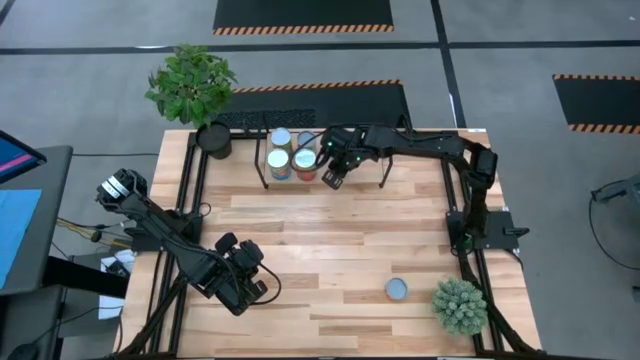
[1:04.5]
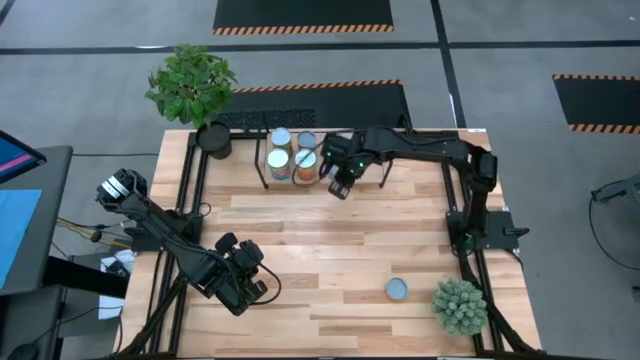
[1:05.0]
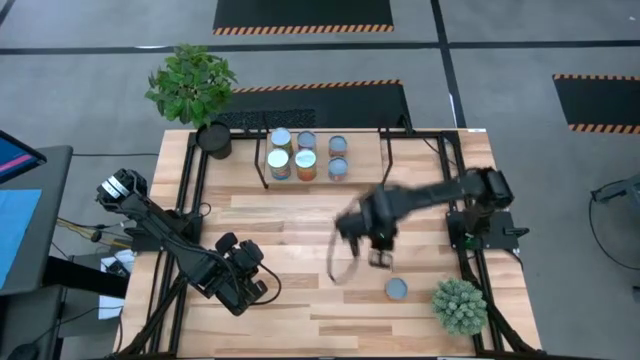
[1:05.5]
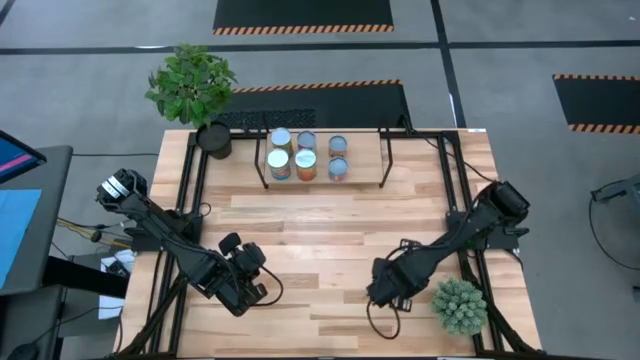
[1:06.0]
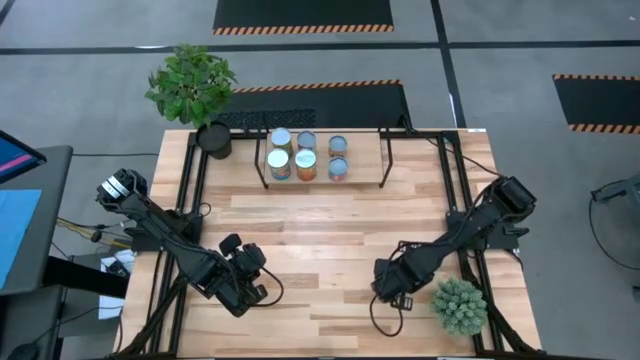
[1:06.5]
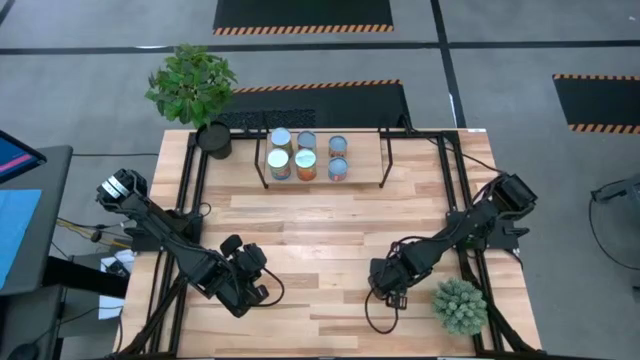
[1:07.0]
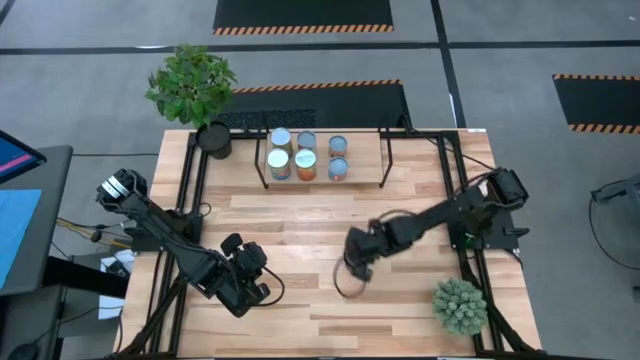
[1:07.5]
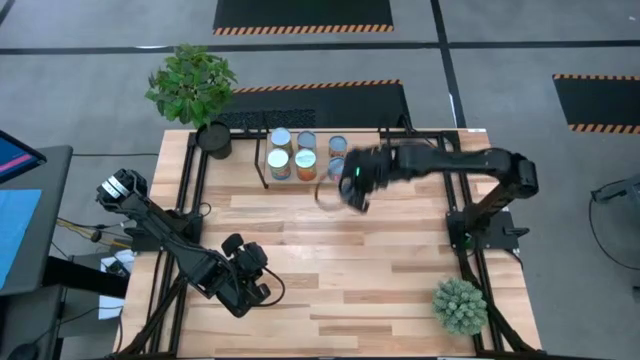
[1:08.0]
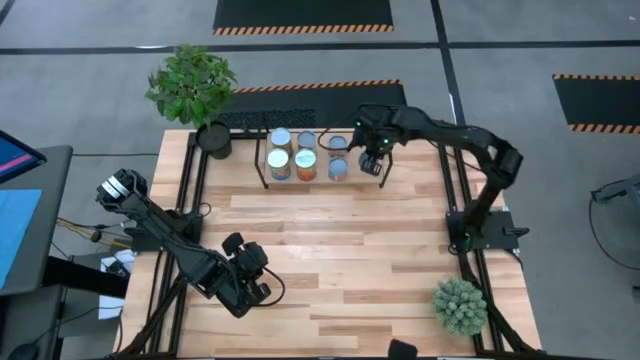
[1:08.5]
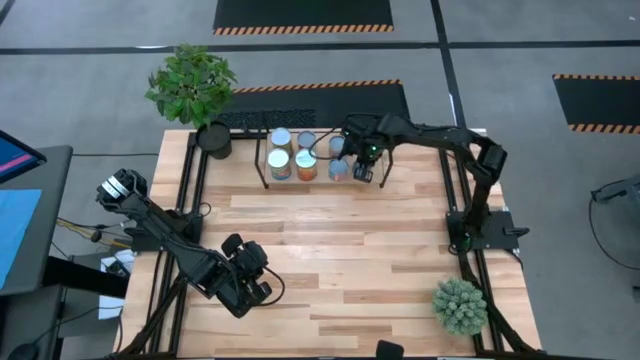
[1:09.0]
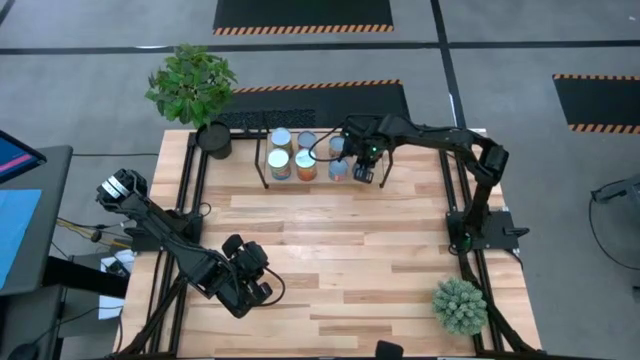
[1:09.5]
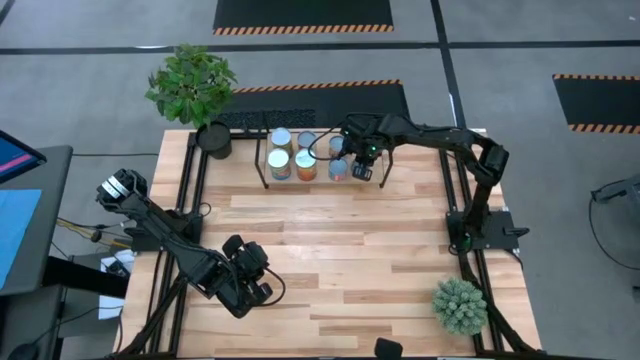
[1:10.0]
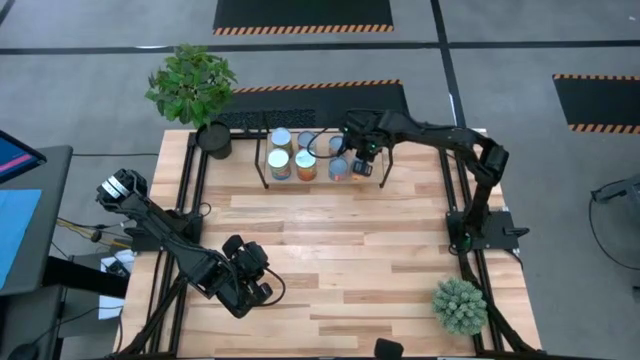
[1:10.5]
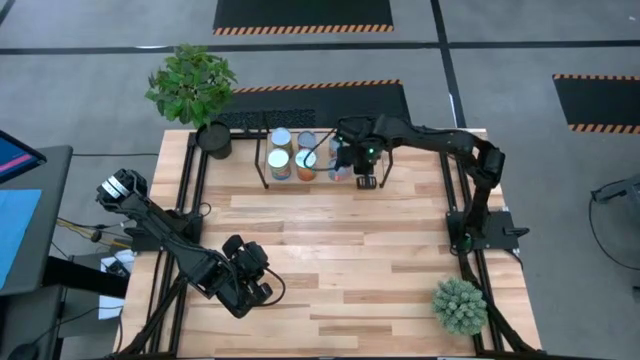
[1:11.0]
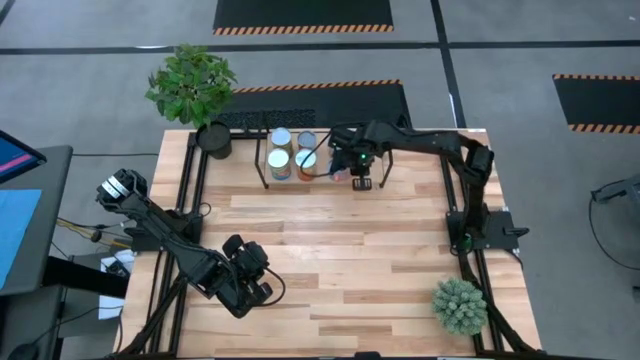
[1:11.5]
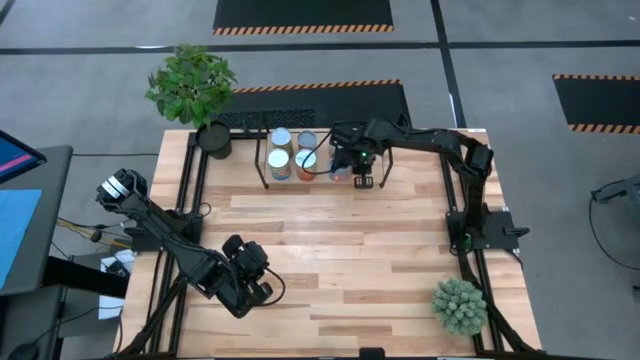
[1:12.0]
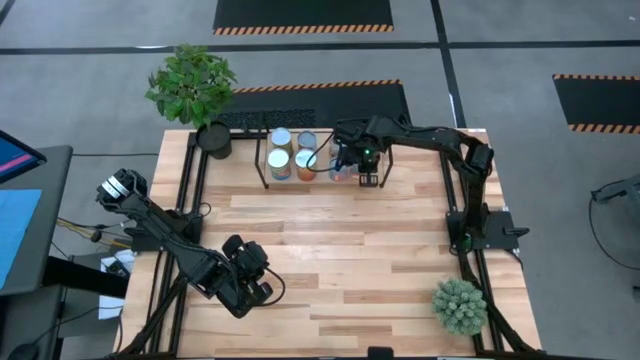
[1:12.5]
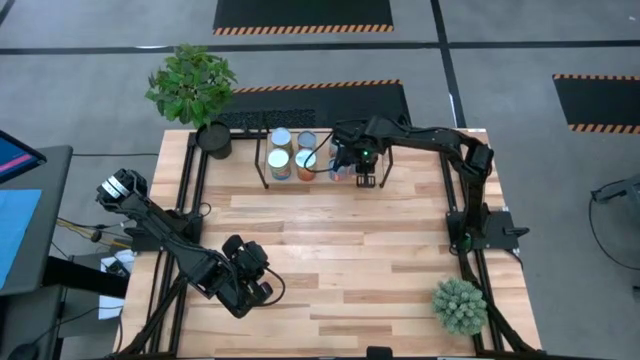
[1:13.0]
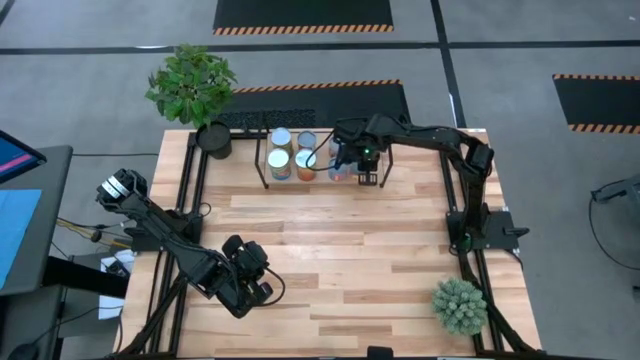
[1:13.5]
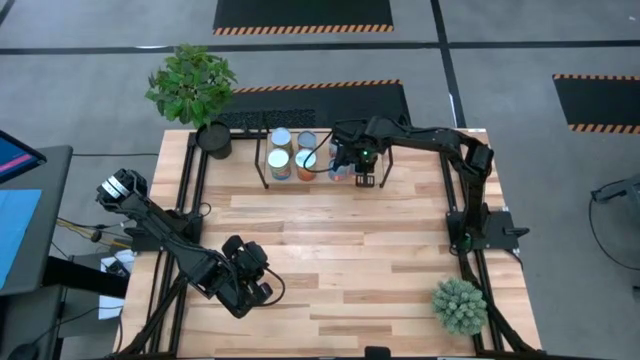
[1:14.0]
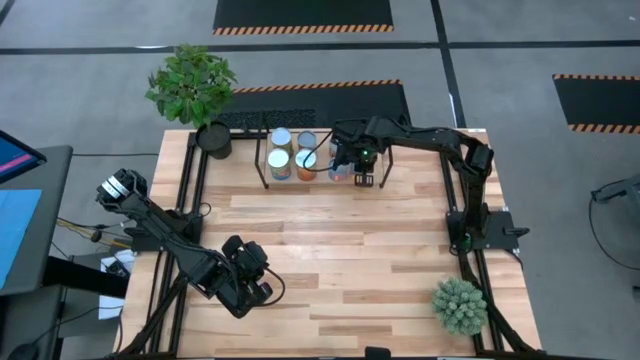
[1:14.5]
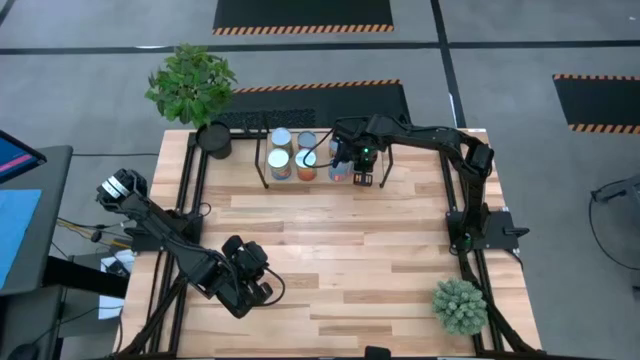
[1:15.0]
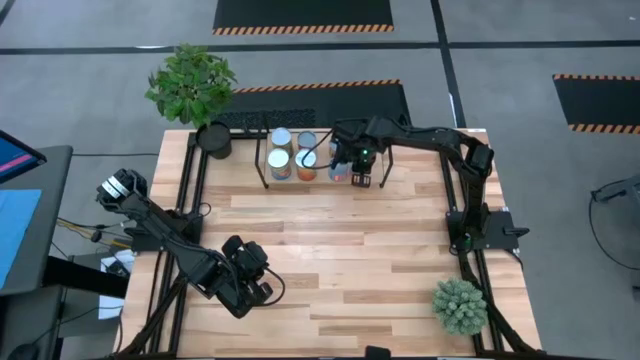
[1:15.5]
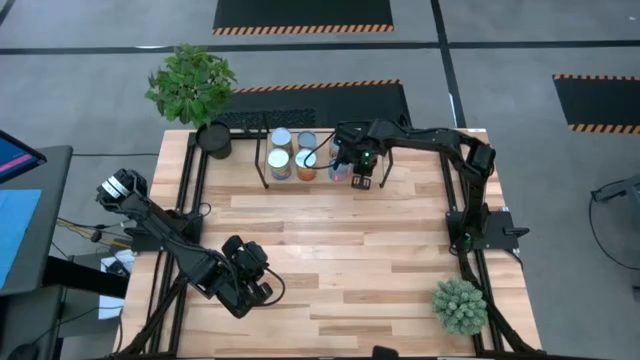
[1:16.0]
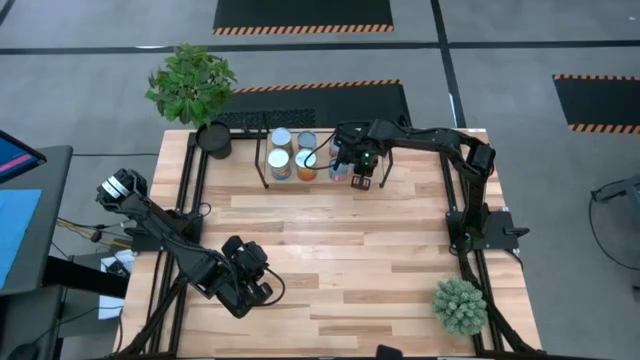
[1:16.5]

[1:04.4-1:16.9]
Task: Pick and place cans onto a shelf
Put the canned orange on the shelf

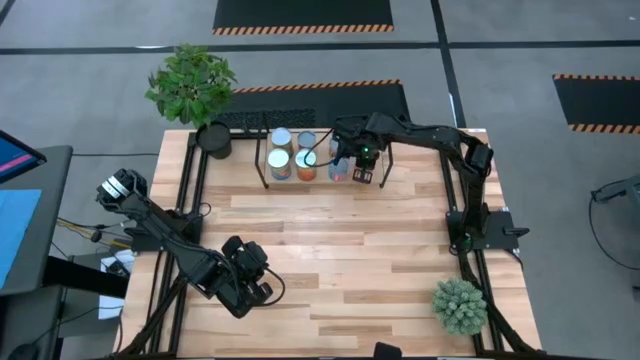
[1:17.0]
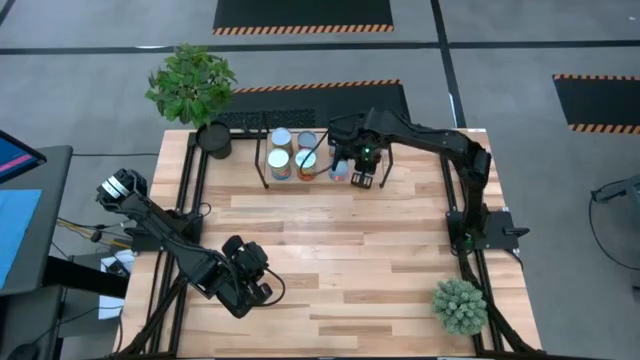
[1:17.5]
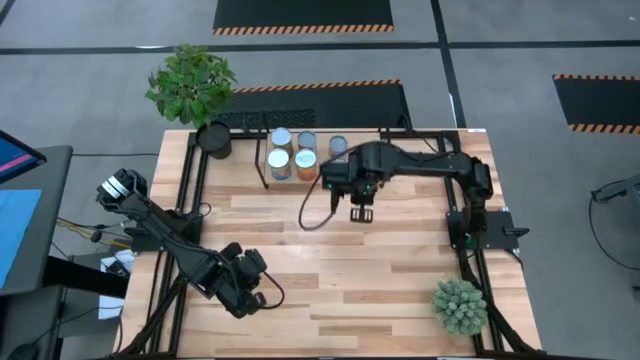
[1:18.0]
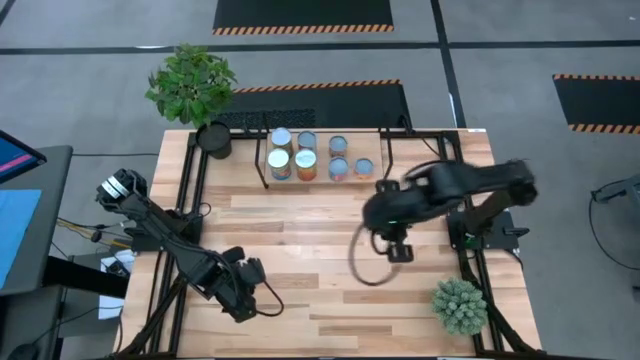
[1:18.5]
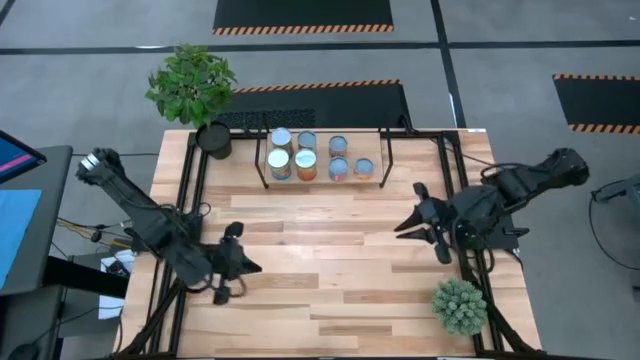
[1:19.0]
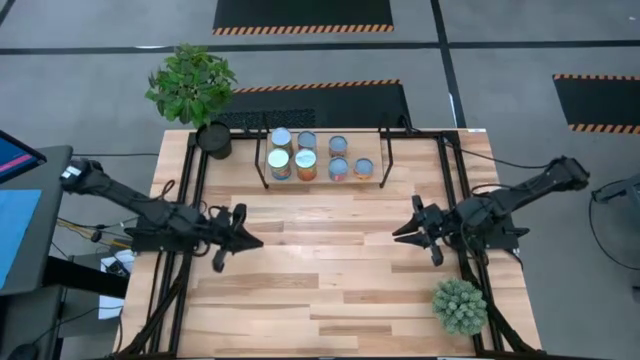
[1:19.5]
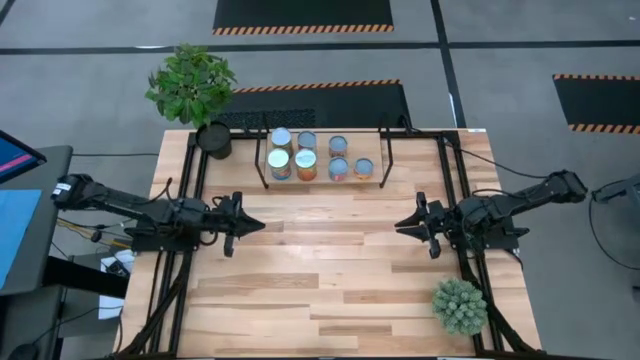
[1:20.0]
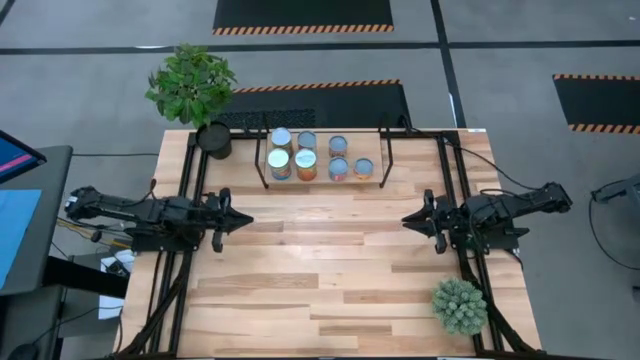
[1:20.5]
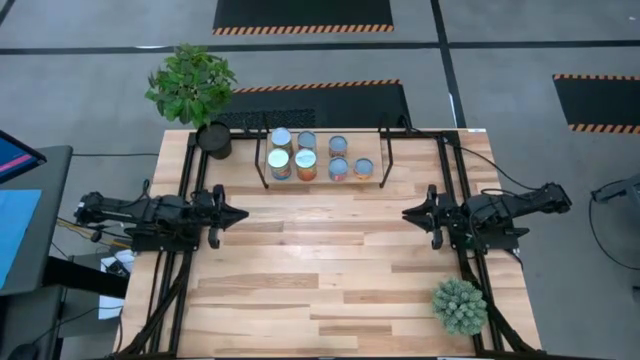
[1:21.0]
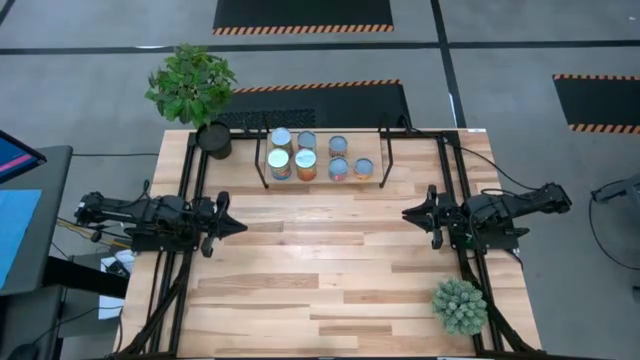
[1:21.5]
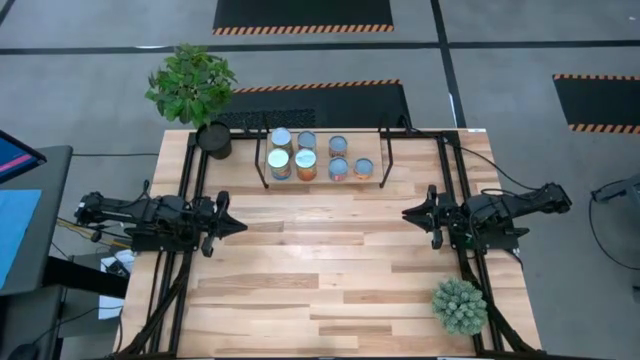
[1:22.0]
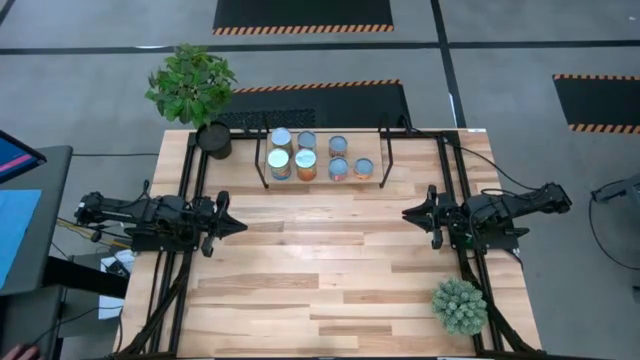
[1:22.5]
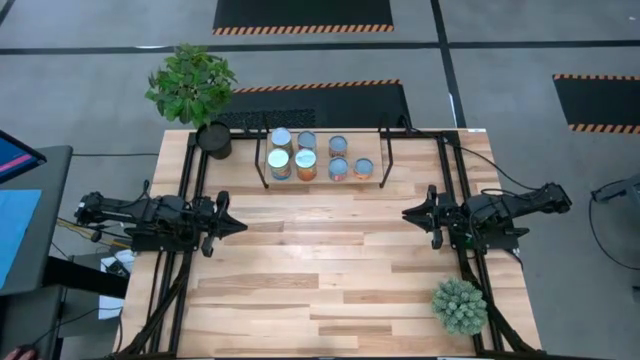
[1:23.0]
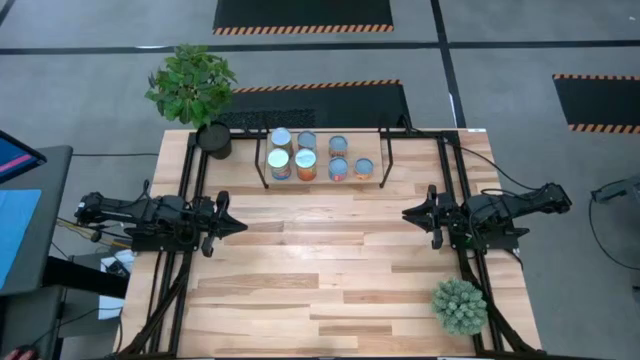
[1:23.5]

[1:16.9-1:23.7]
Return to Home Position

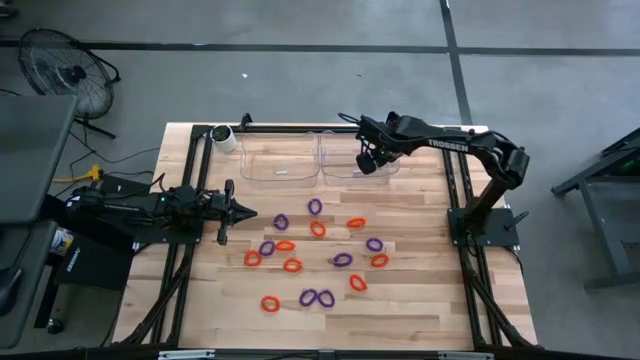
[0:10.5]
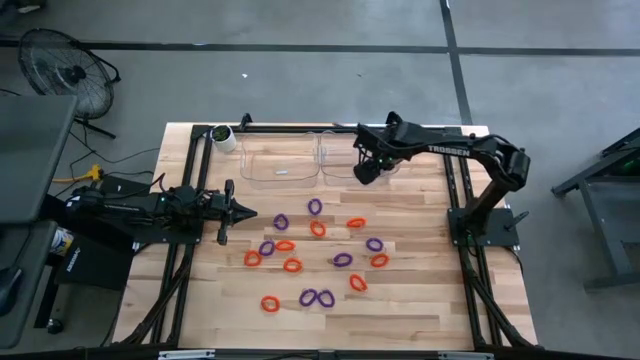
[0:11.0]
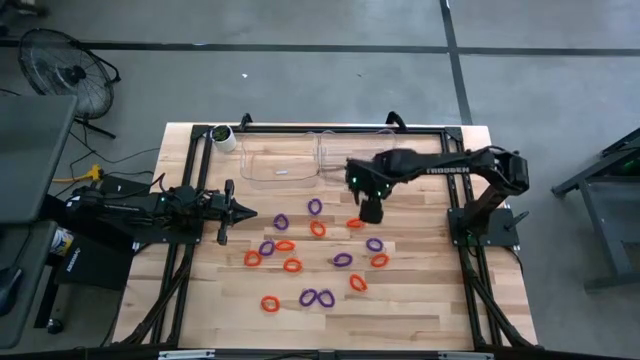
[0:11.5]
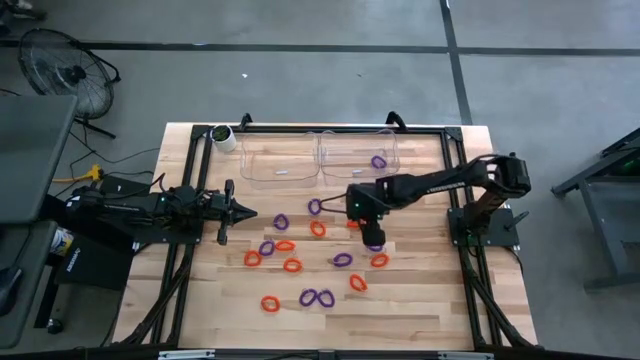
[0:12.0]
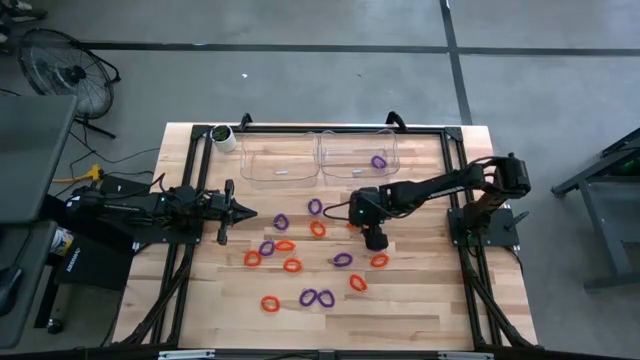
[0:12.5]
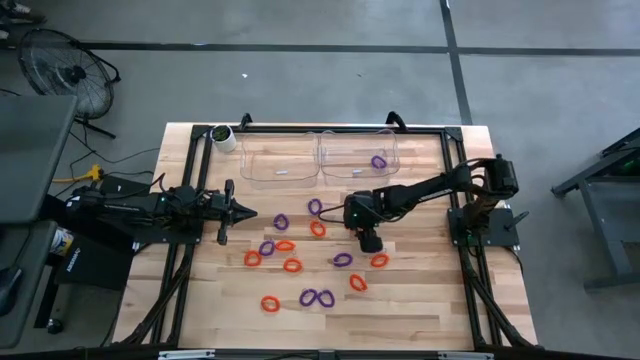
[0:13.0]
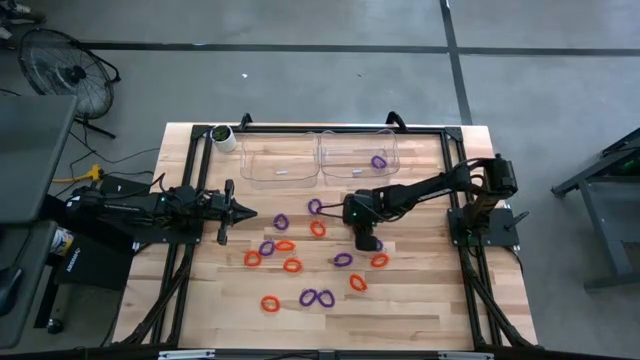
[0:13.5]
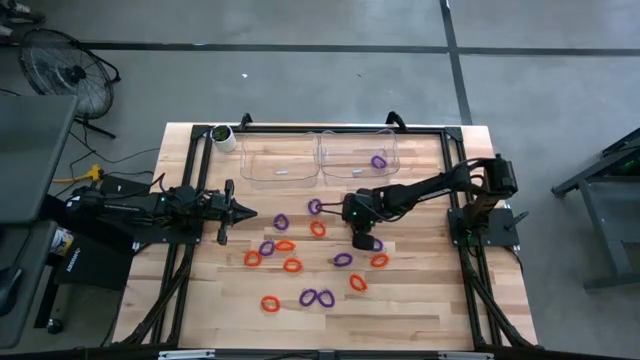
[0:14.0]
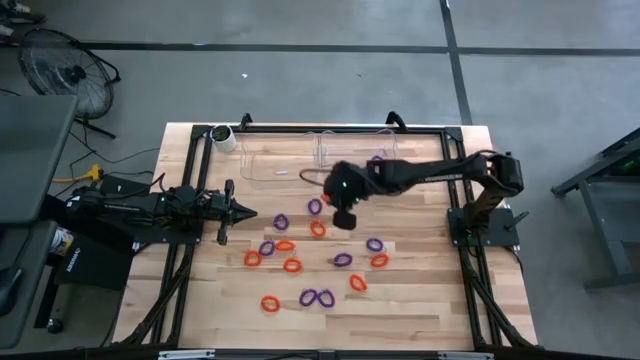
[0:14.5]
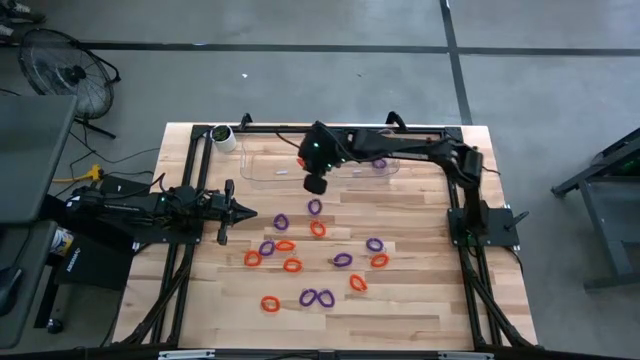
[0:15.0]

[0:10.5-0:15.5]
Task: Sort spring keychains
Put the orange spring keychain into the left bin
